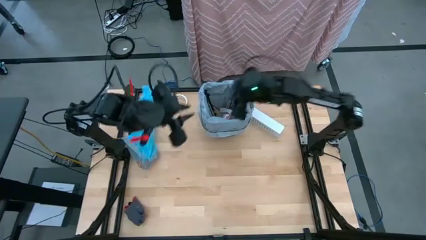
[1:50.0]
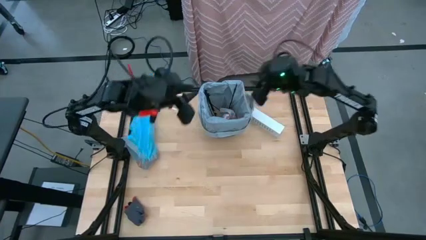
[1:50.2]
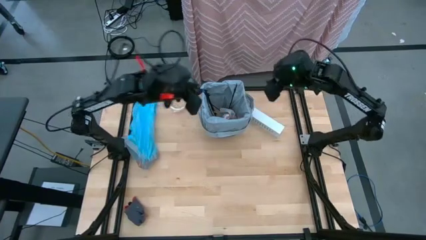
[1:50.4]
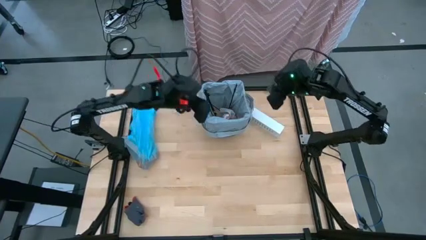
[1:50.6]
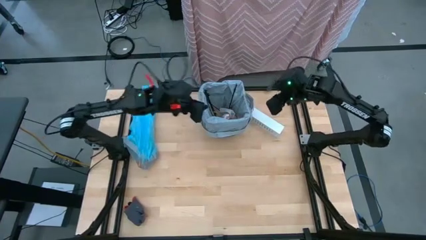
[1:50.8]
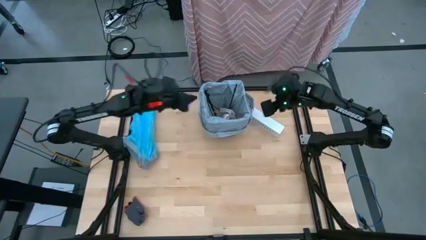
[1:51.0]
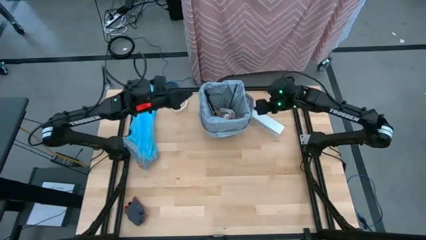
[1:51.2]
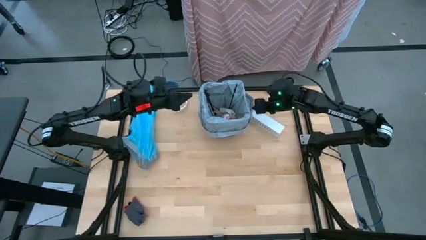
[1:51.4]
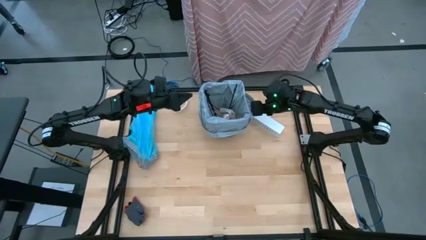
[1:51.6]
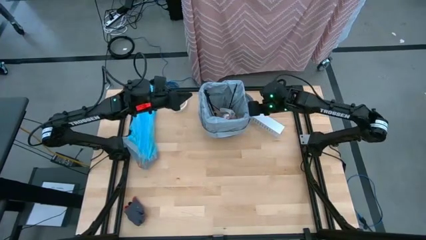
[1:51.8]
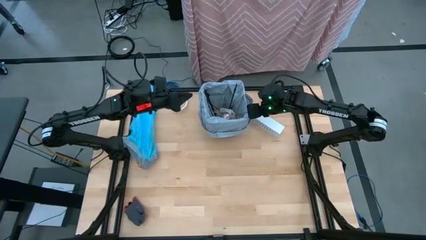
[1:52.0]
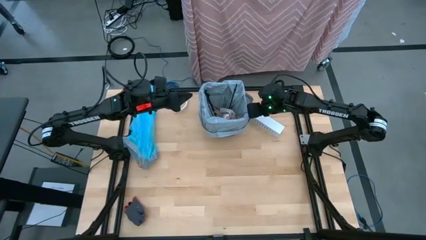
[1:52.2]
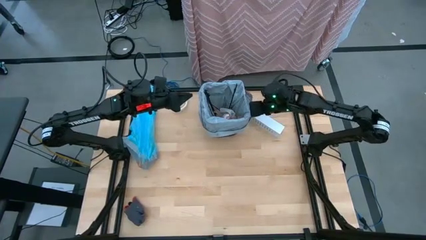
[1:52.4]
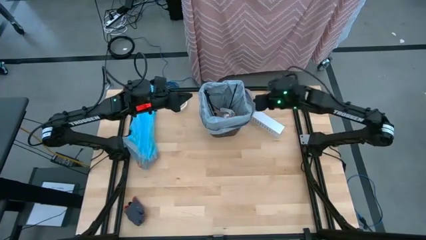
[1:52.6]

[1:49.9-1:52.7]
Task: place trash/remove bag and relplace
Remove the trash bag from the trash bin

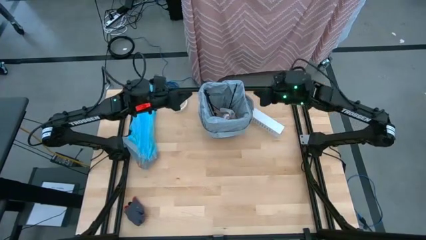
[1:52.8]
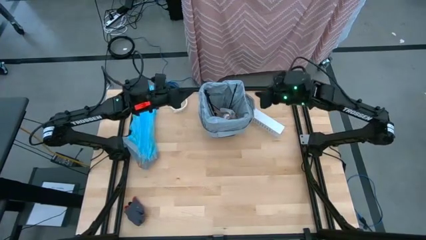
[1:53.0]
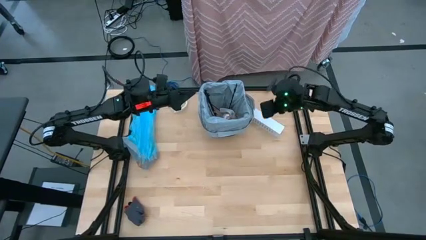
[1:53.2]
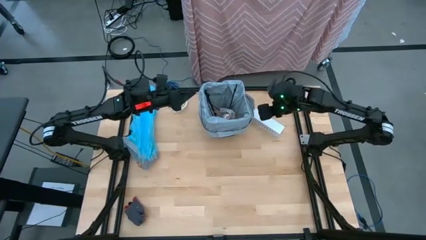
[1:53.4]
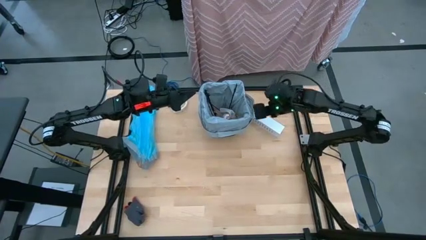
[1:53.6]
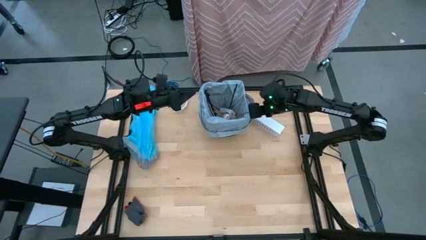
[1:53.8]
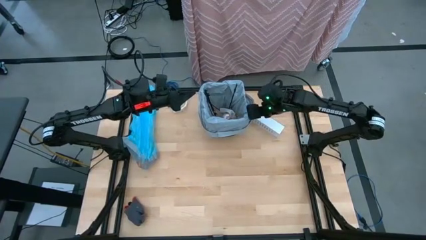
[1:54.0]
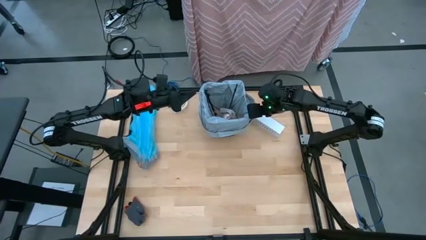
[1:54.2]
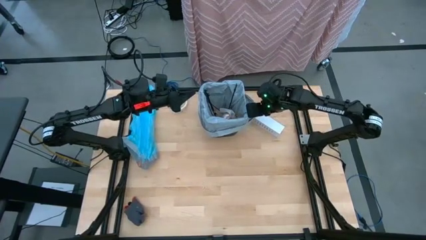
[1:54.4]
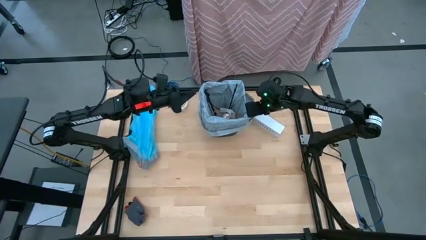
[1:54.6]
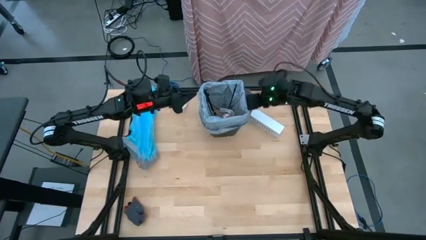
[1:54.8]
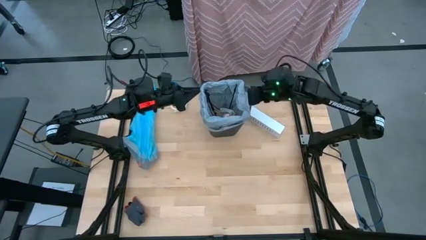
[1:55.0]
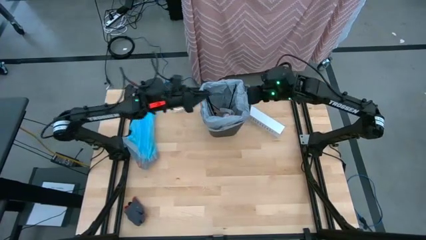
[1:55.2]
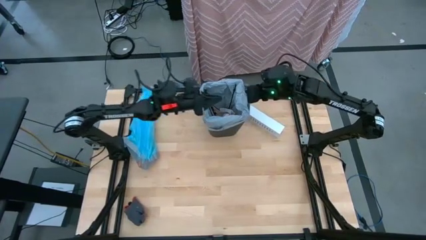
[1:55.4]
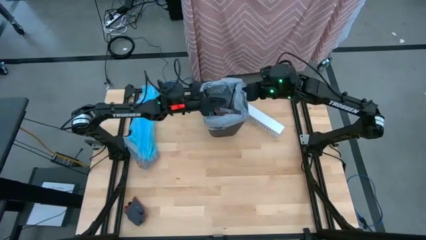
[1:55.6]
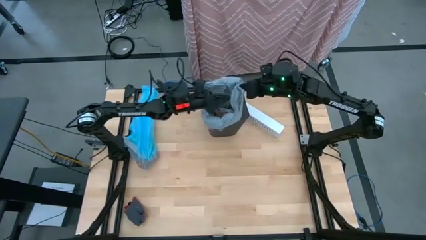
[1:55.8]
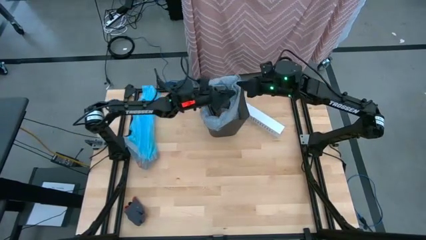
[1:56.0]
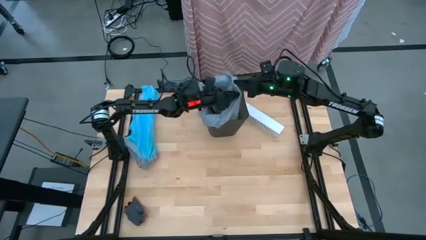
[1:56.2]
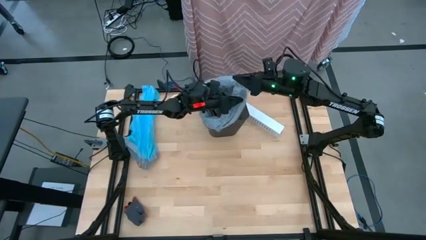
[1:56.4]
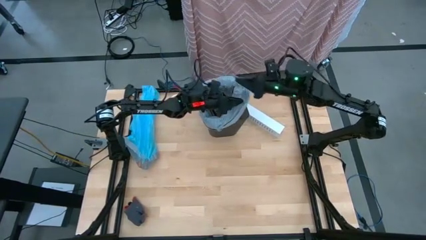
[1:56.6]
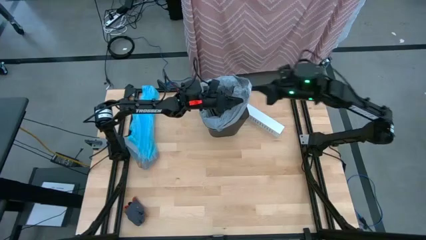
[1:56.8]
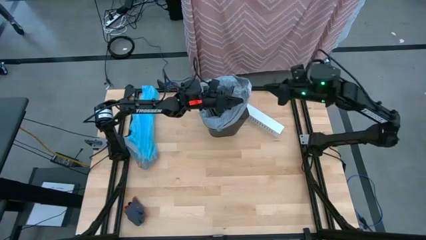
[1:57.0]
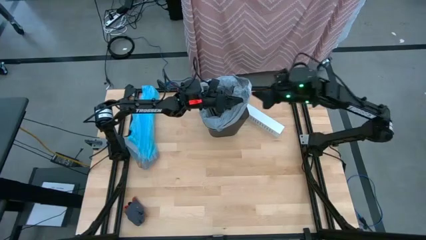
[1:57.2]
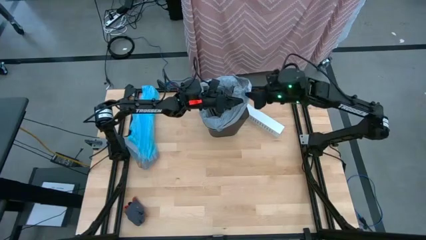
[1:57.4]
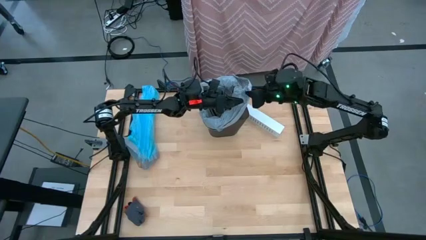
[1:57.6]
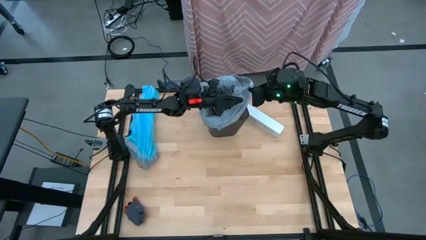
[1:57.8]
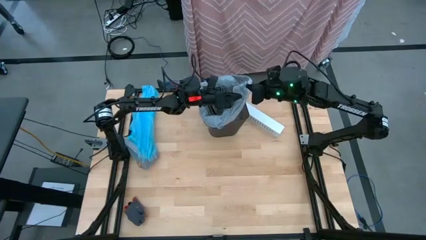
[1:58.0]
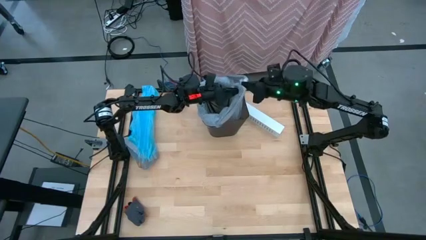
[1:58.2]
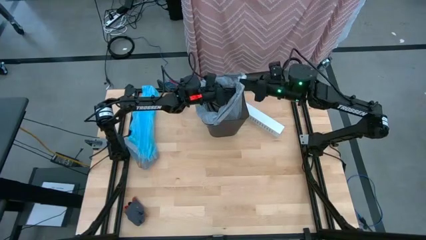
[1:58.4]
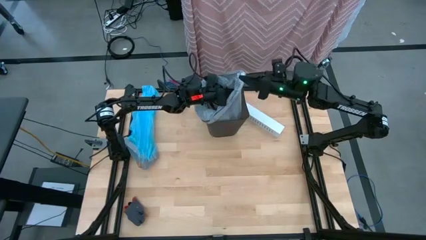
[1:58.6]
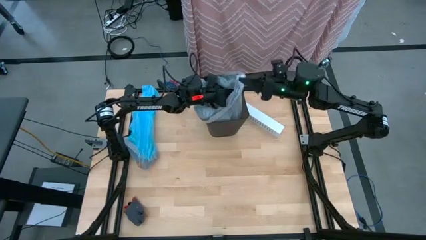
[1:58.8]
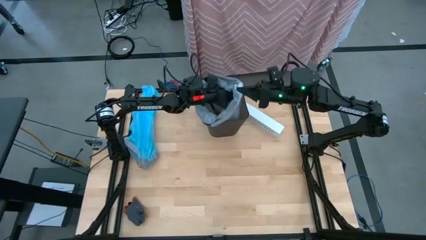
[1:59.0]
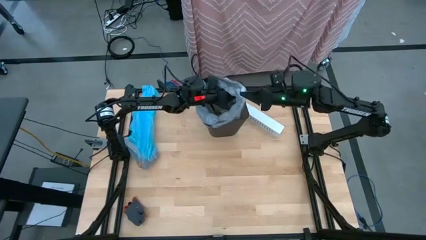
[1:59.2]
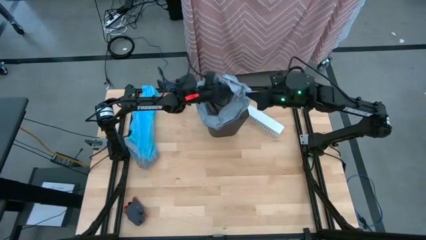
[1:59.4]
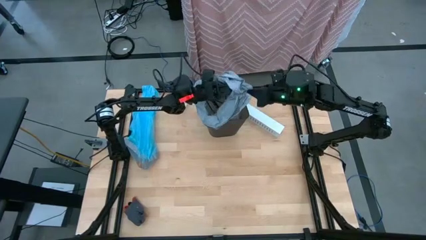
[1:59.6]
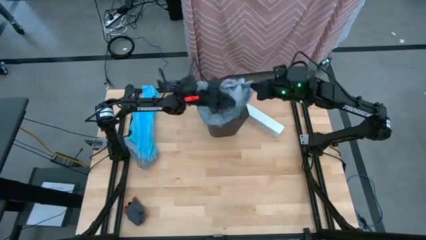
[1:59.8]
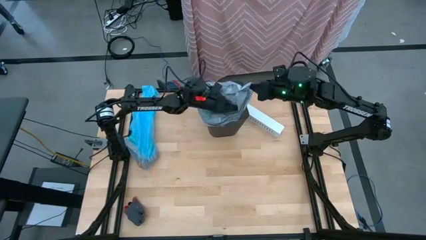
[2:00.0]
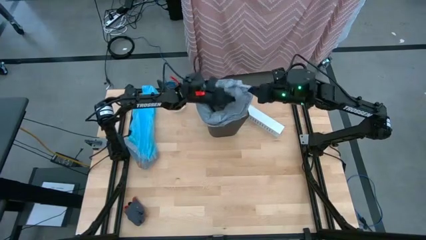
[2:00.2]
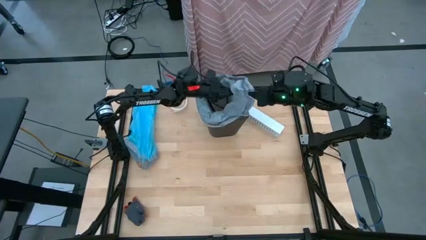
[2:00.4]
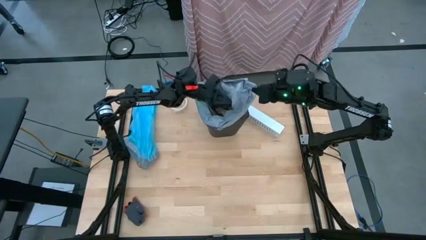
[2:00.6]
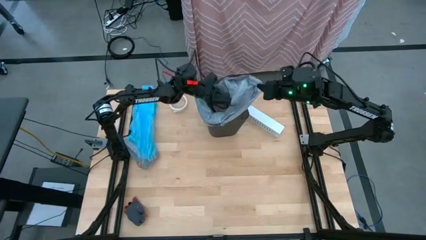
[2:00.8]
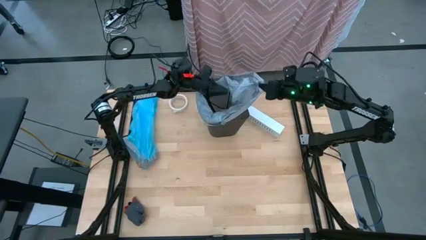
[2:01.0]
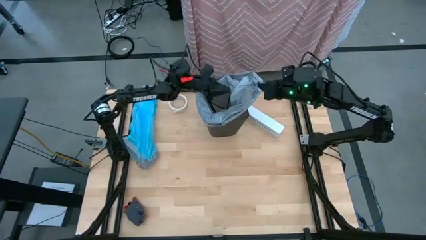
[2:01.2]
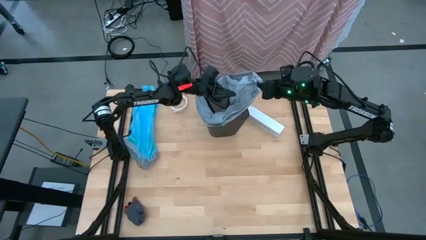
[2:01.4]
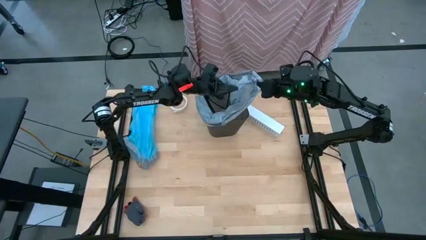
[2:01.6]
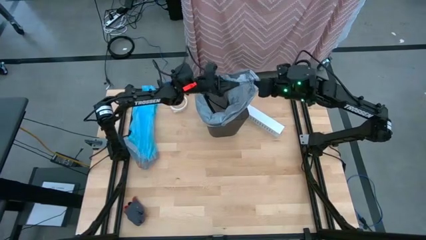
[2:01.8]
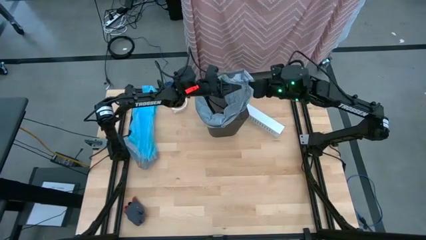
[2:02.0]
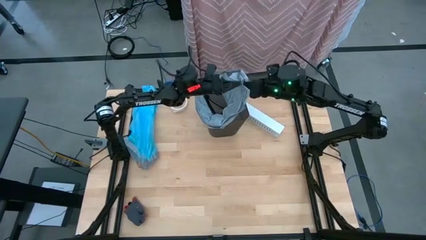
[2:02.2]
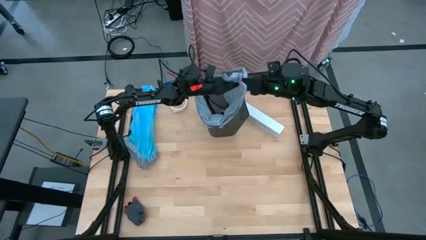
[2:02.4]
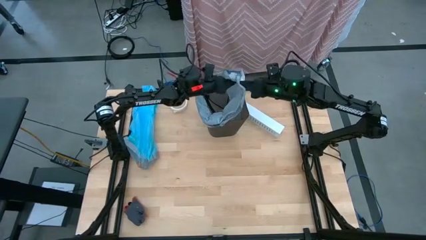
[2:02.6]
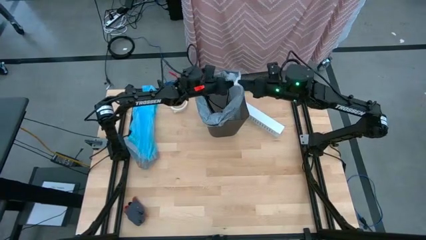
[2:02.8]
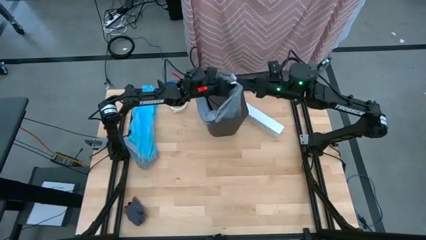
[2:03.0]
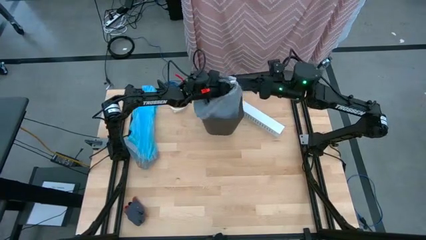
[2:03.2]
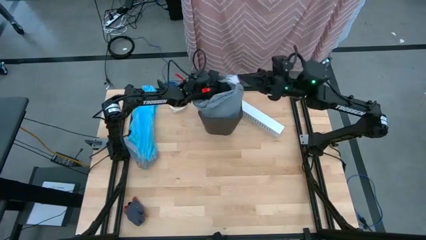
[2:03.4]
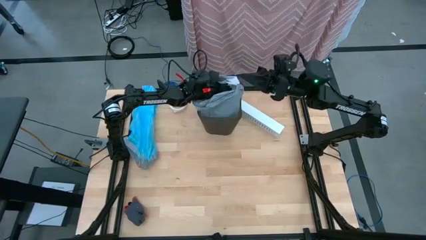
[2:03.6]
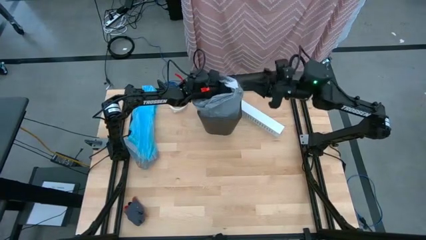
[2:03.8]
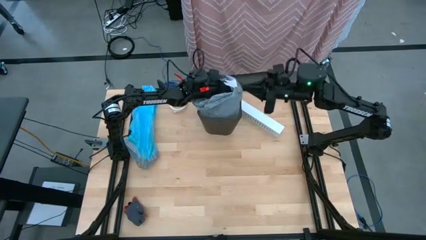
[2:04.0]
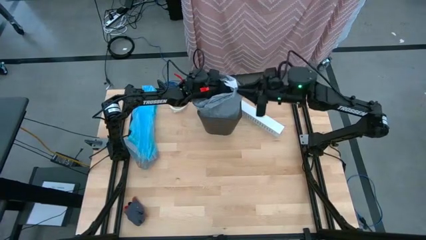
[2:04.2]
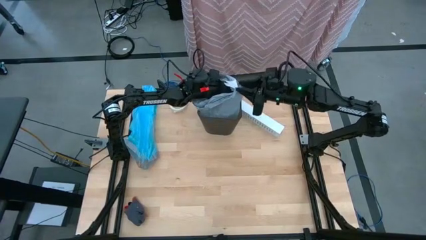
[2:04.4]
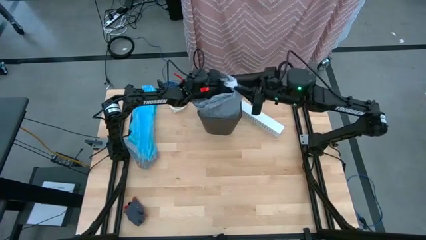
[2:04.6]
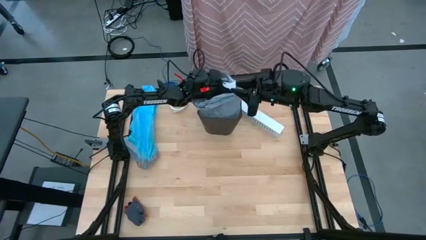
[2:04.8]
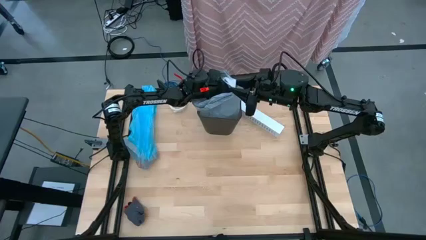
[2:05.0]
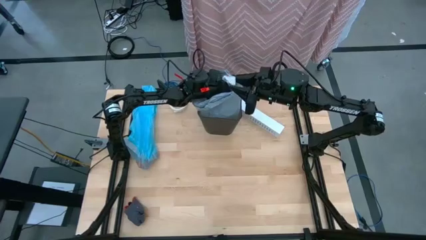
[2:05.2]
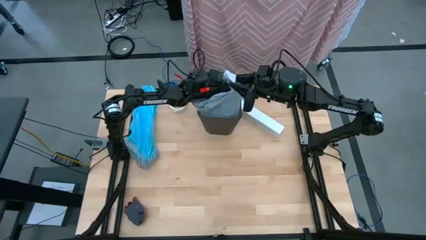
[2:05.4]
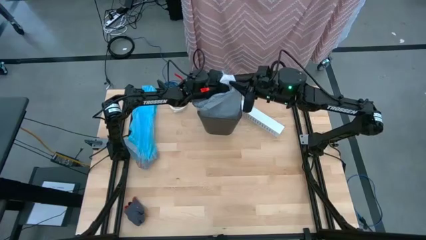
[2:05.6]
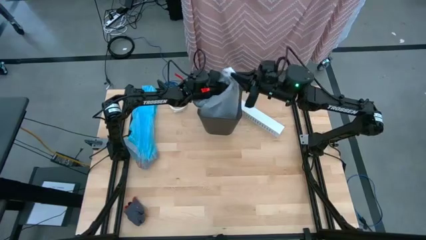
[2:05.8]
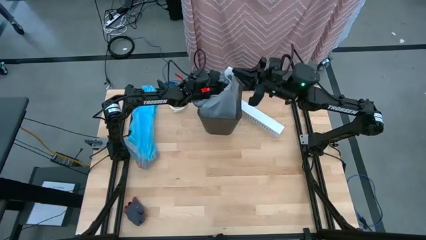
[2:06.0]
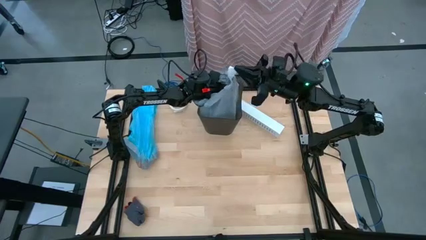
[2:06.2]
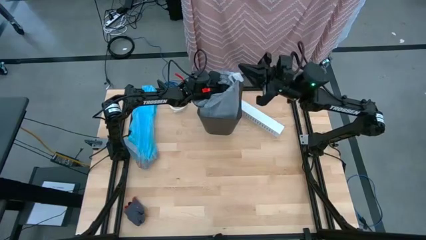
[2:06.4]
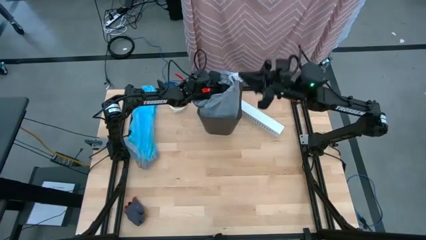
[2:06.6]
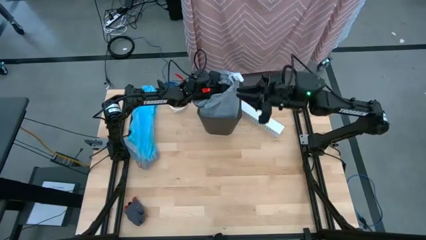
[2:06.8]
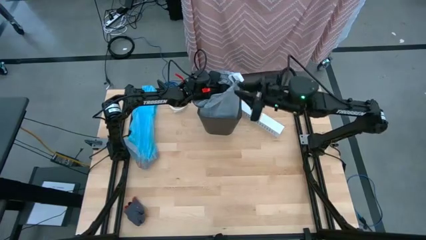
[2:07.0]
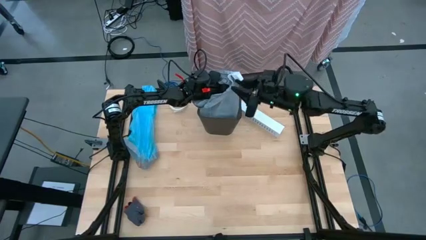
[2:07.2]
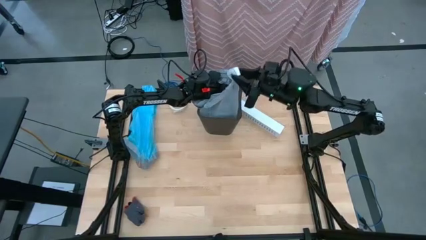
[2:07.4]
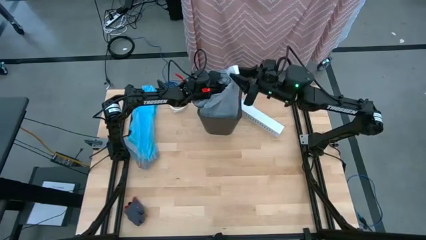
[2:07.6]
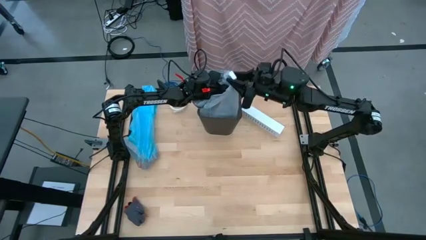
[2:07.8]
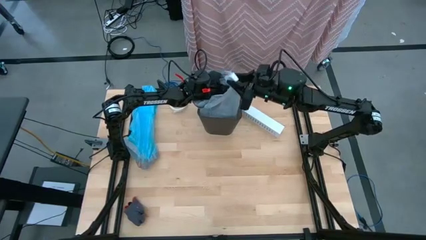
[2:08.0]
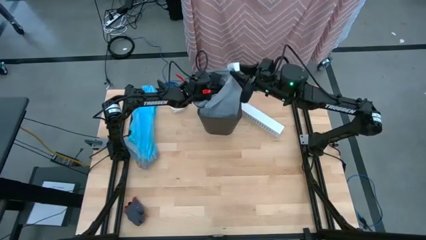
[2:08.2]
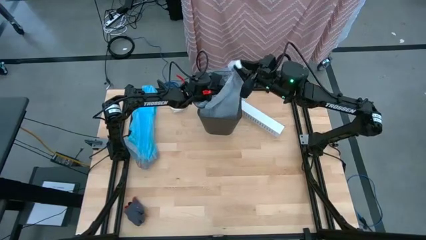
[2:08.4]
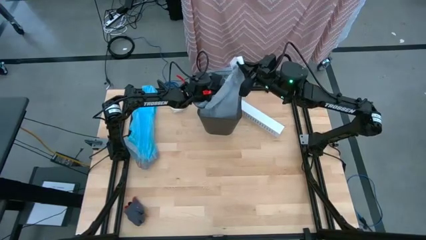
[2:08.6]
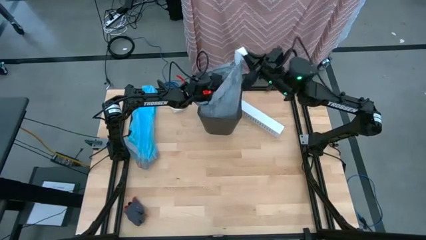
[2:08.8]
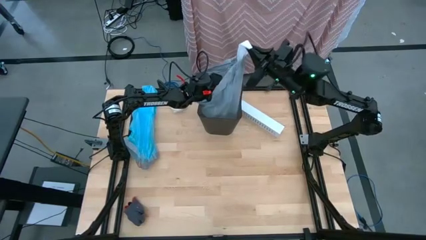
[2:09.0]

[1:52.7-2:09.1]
Remove the trash bag from the trash bin
